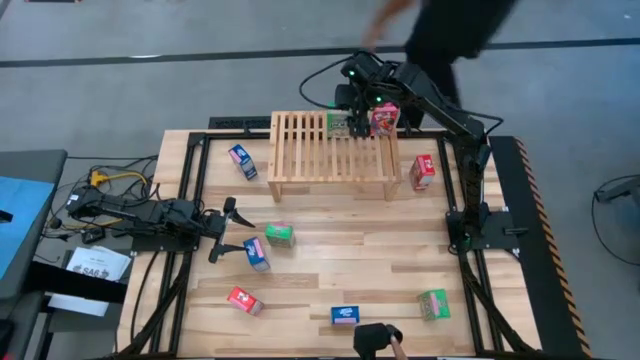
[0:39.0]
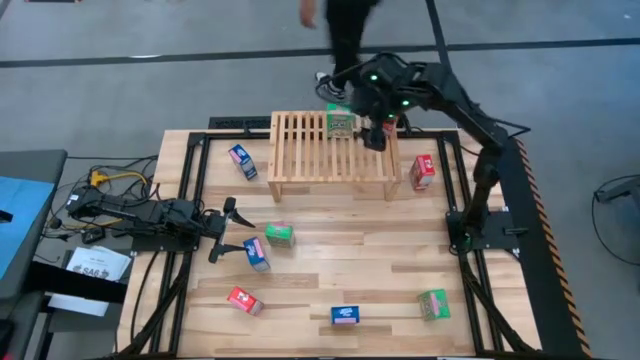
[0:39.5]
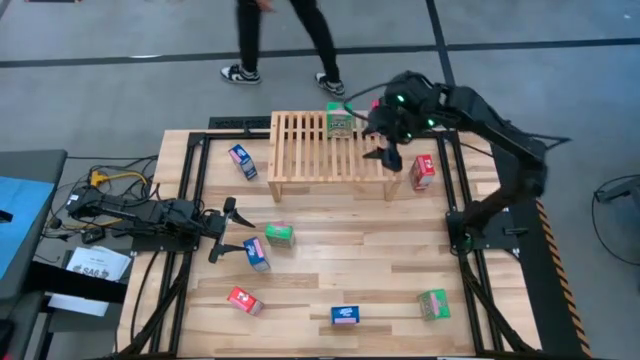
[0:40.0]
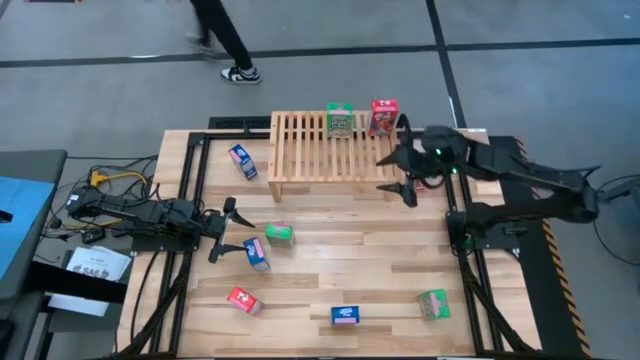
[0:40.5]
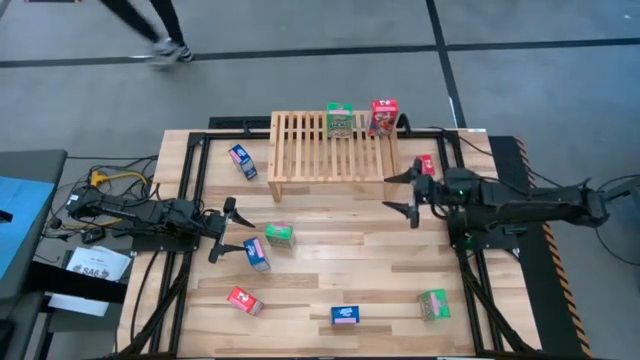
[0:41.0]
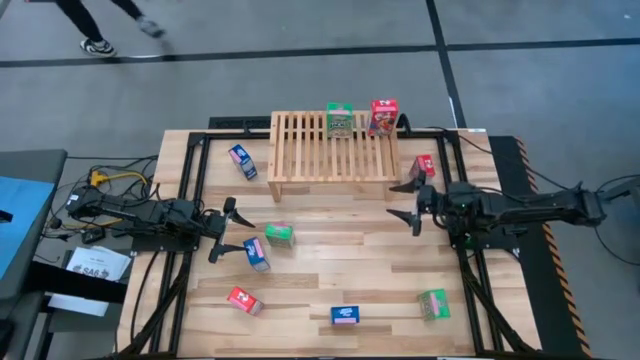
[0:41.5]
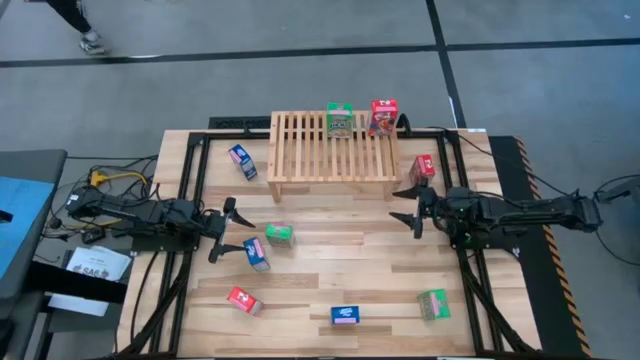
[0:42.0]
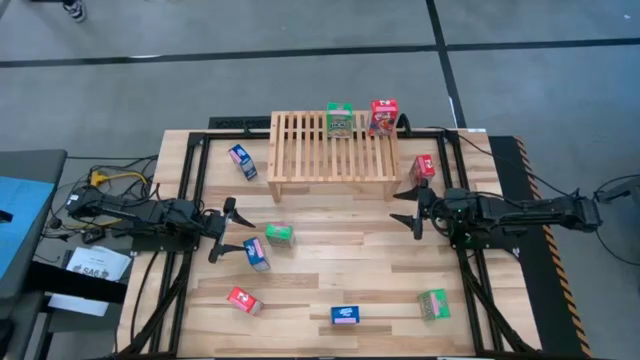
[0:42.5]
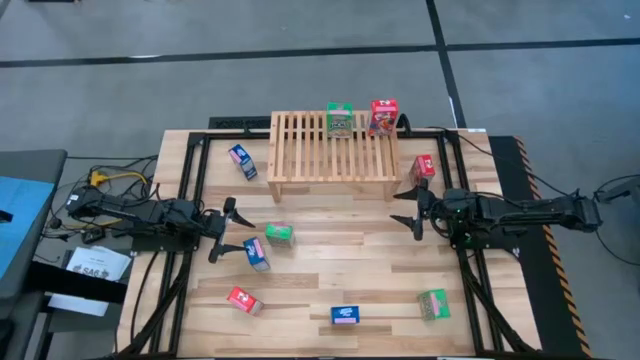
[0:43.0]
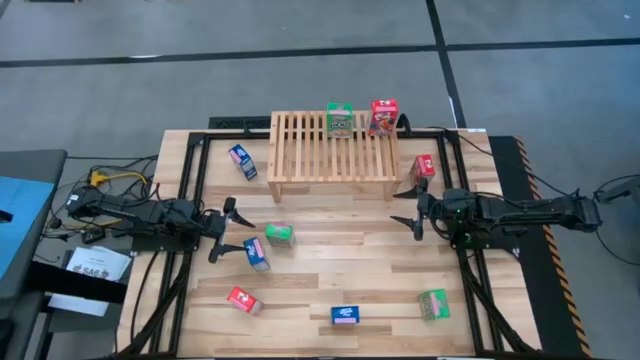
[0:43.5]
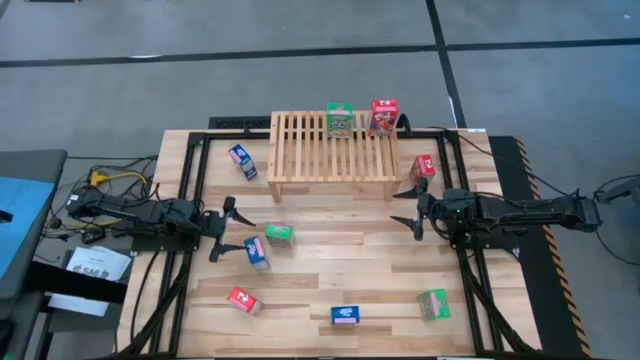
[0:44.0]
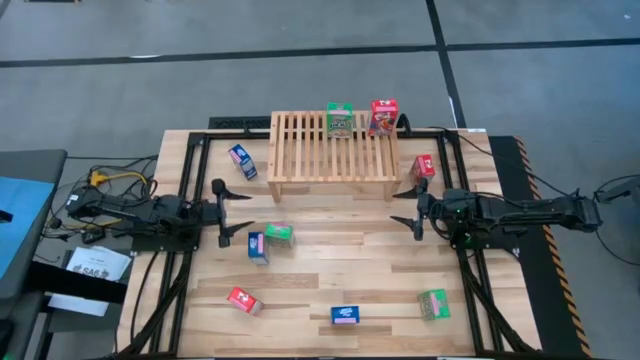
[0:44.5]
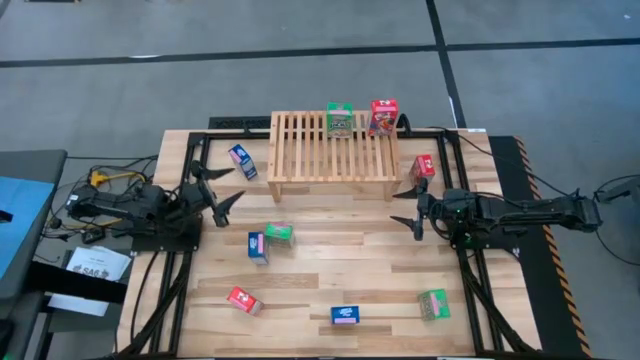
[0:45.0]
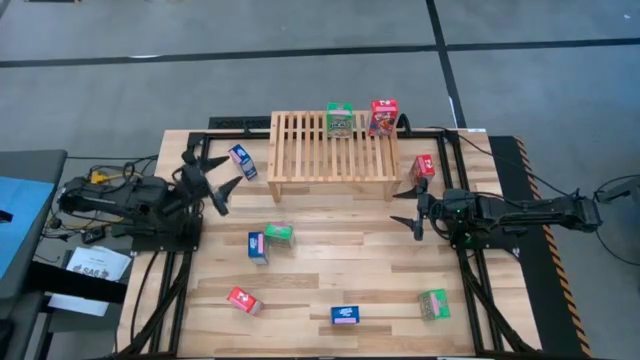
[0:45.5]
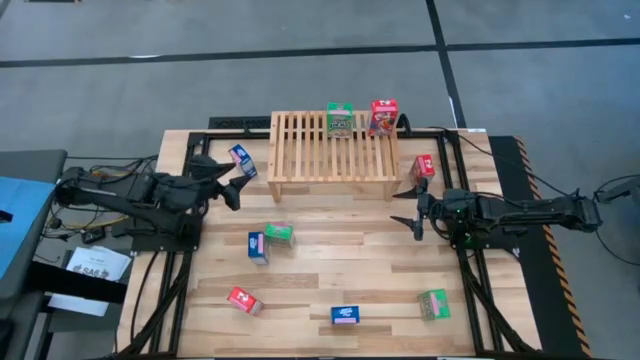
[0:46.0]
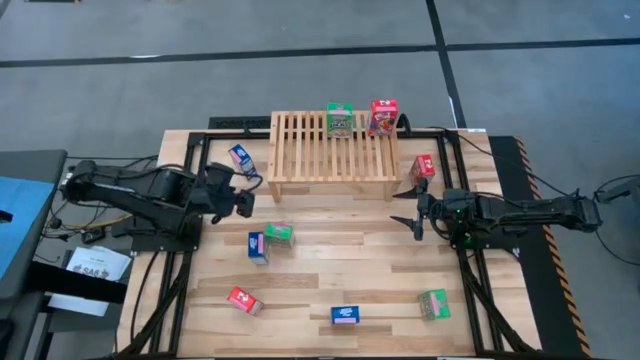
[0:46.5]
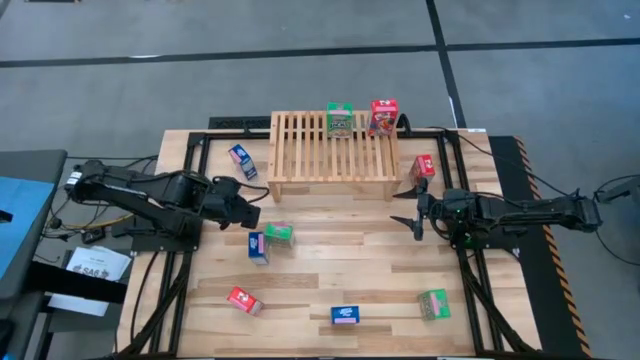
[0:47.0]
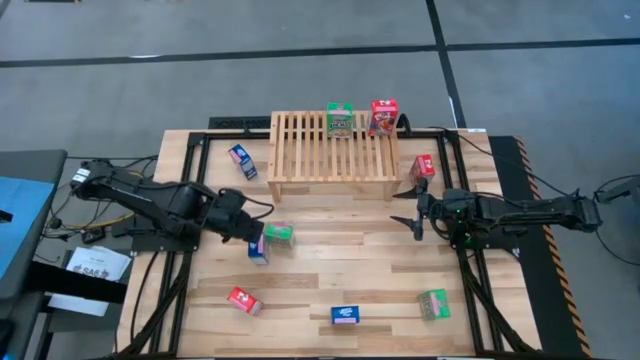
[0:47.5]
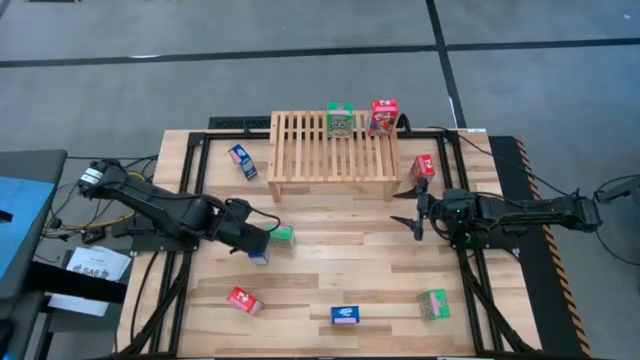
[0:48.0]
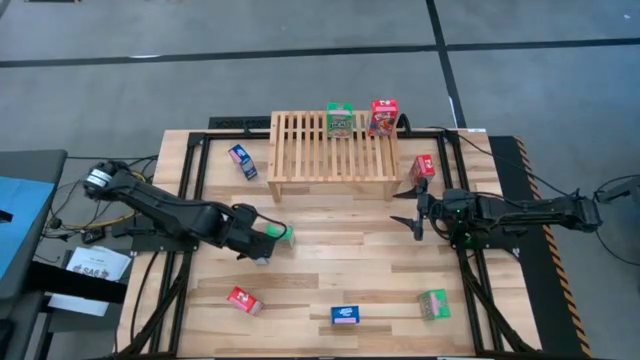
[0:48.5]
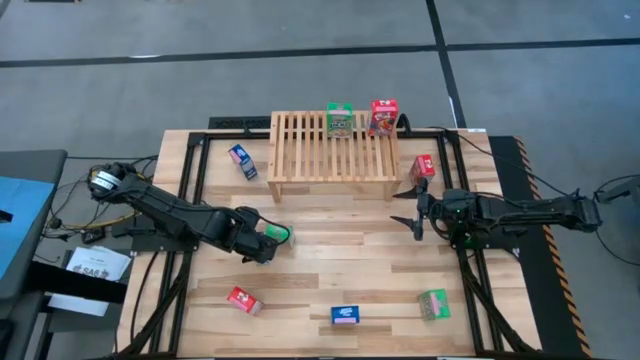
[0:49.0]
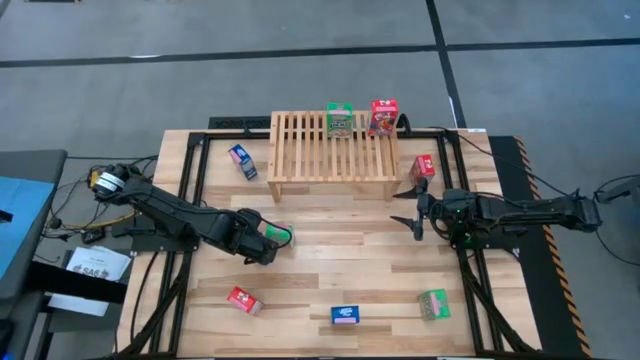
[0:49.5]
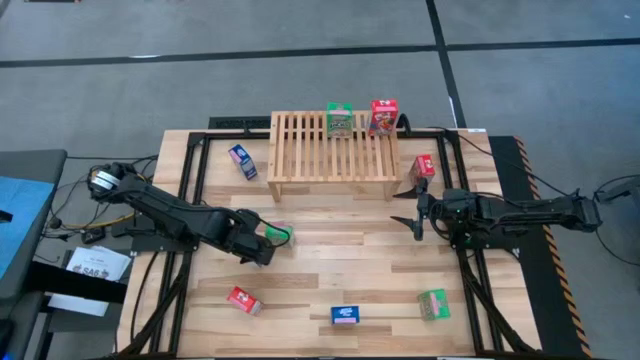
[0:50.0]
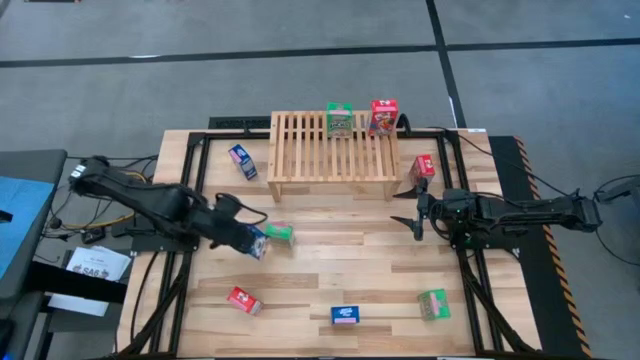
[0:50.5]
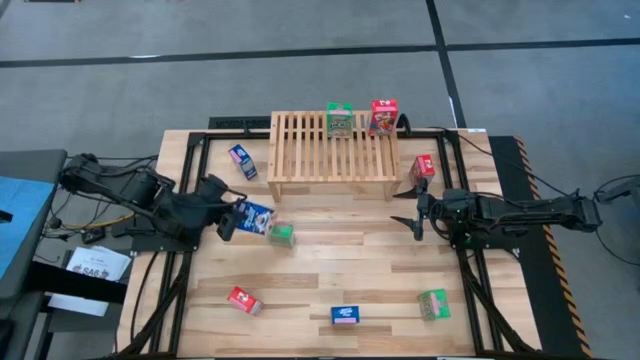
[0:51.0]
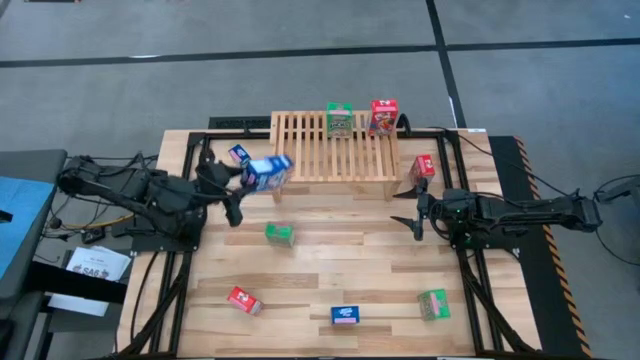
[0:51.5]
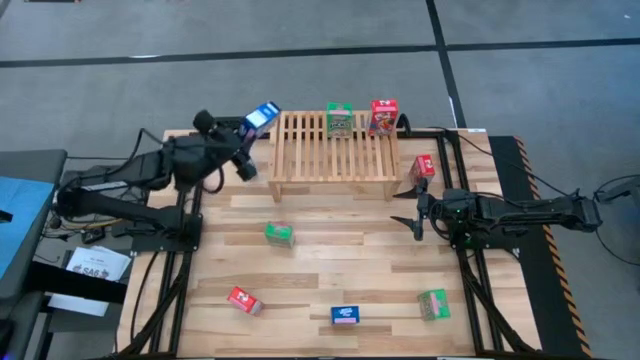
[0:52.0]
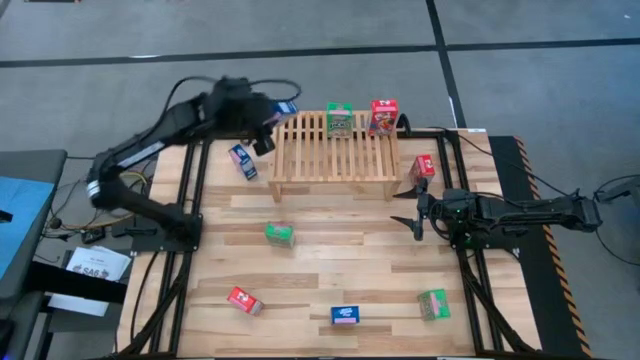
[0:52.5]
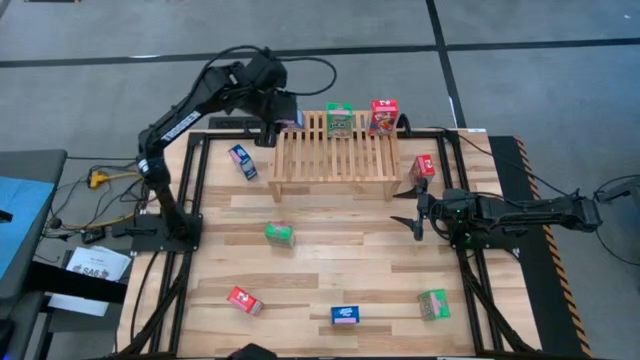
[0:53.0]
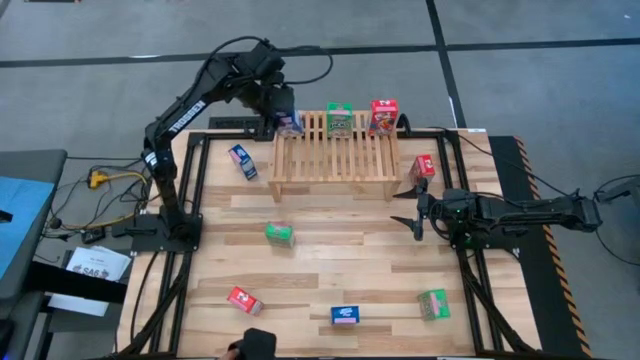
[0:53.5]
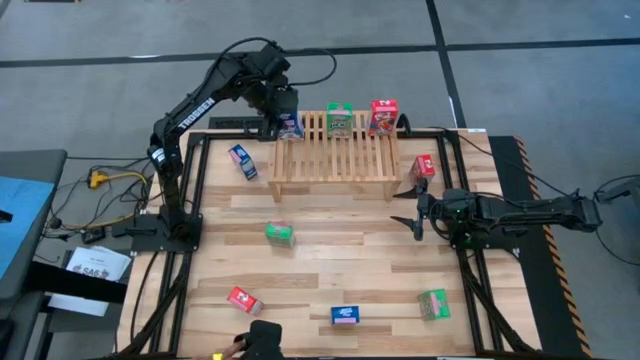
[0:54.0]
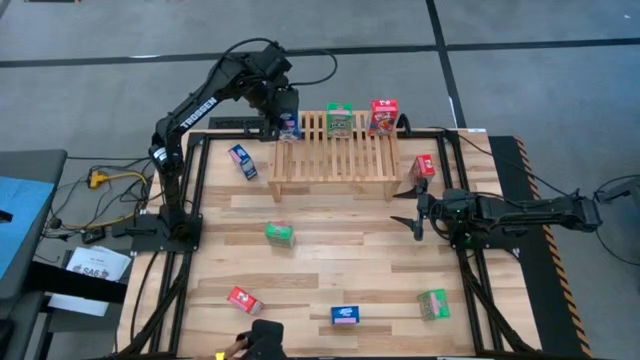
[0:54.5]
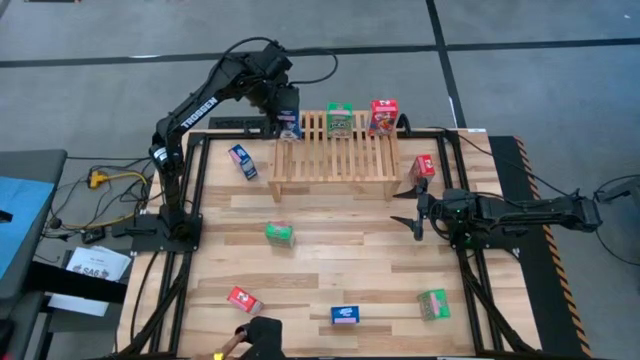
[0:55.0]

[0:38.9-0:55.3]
Task: Stack cereal on shelf
Put the middle blue cereal box on the shelf

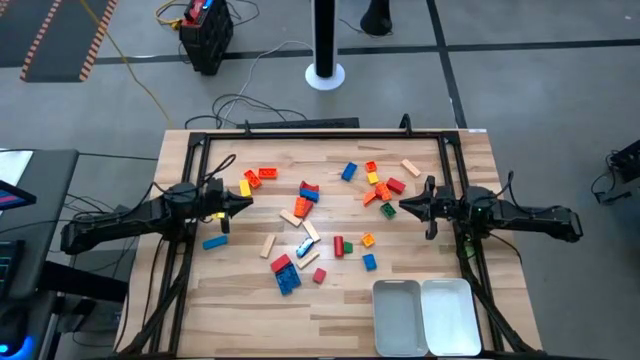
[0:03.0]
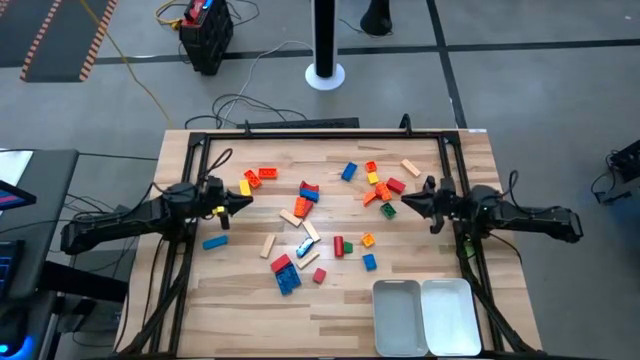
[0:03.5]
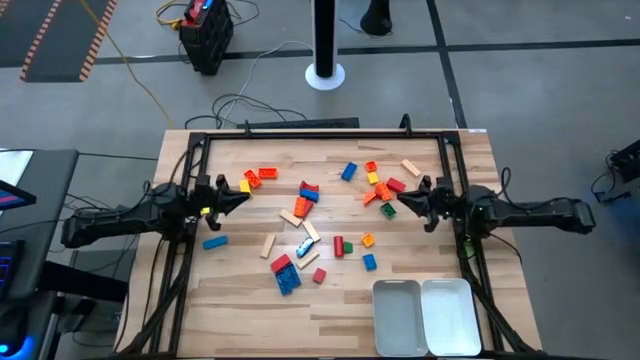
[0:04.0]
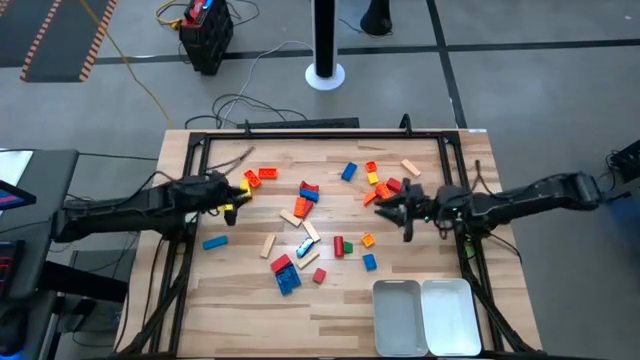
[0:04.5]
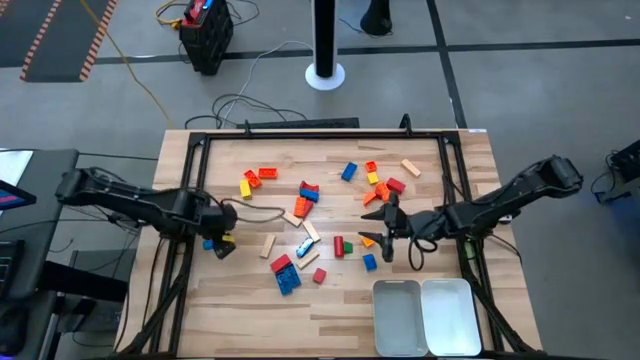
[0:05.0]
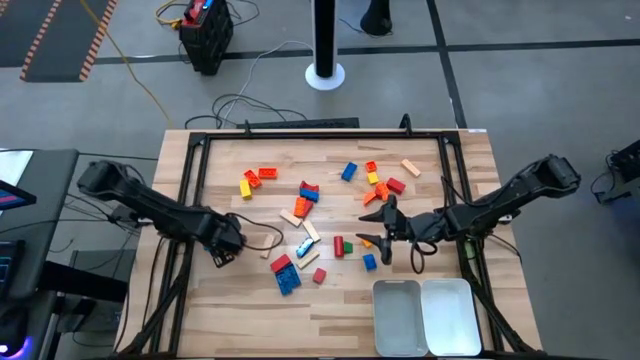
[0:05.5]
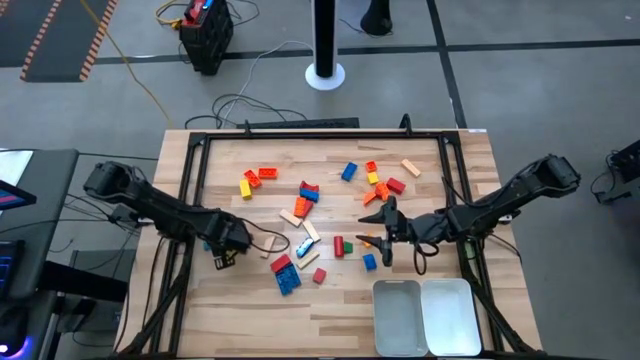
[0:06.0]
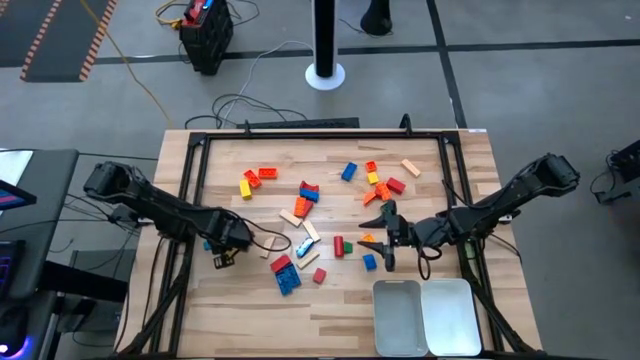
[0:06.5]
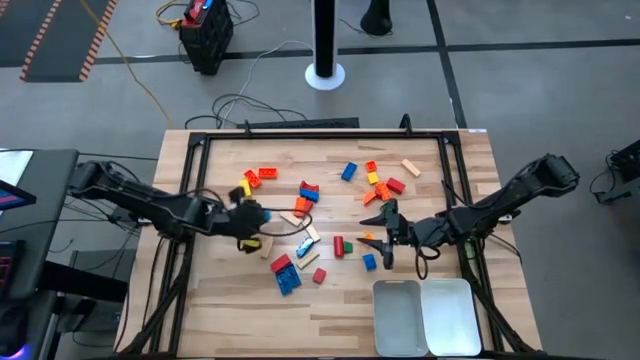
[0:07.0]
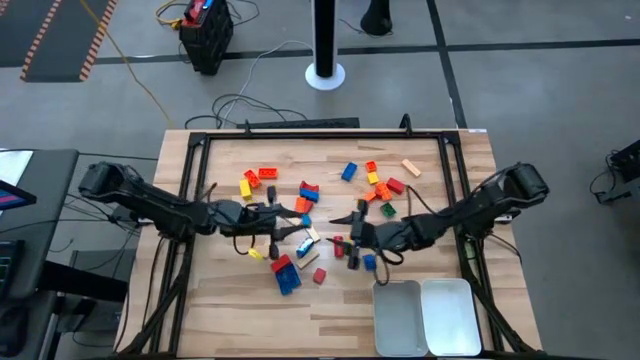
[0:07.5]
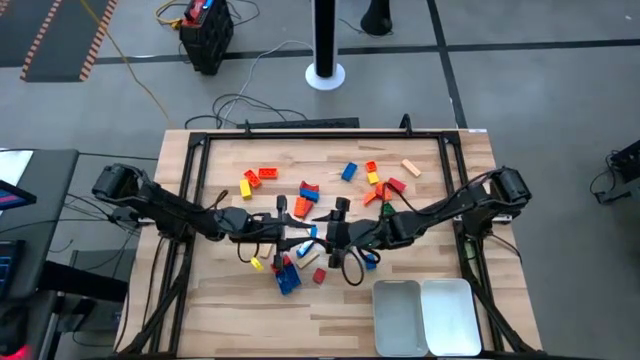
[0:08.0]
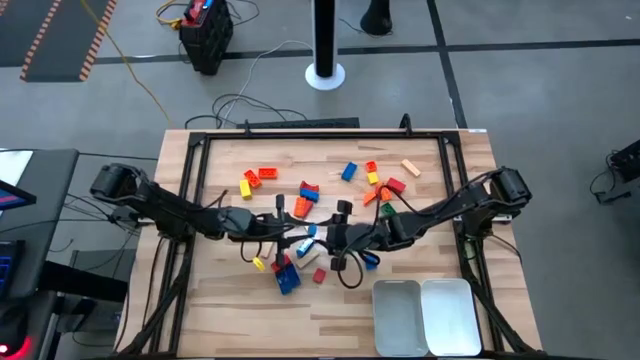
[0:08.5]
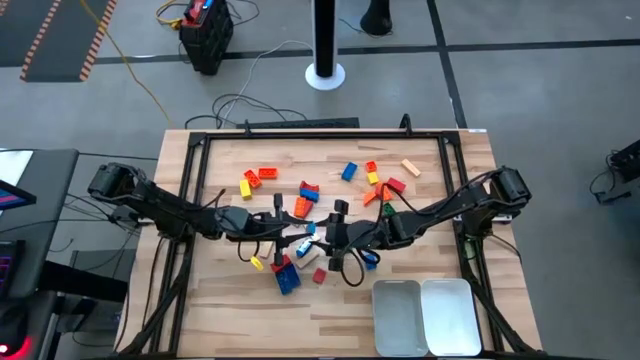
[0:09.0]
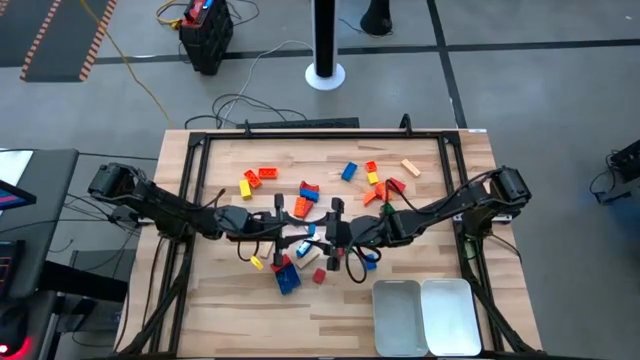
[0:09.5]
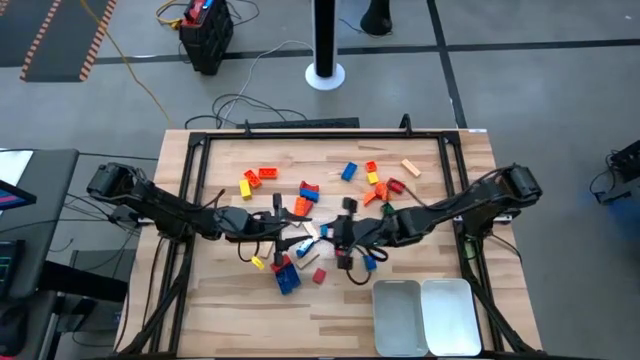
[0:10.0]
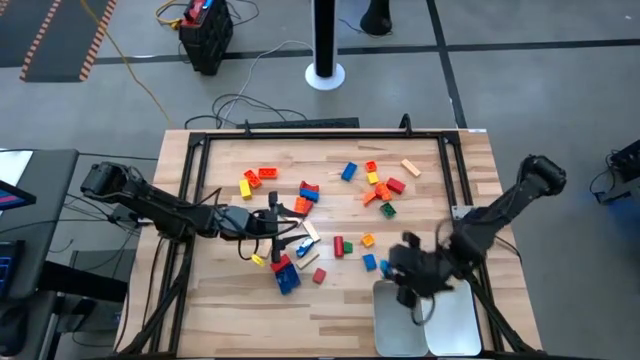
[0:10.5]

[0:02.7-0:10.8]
Task: Sort blocks by size
Put the large blue wooden block into the gray bin
